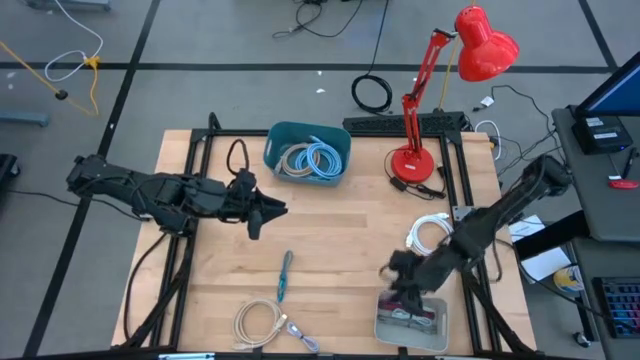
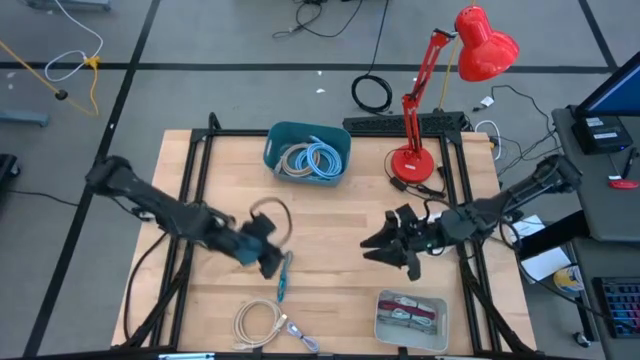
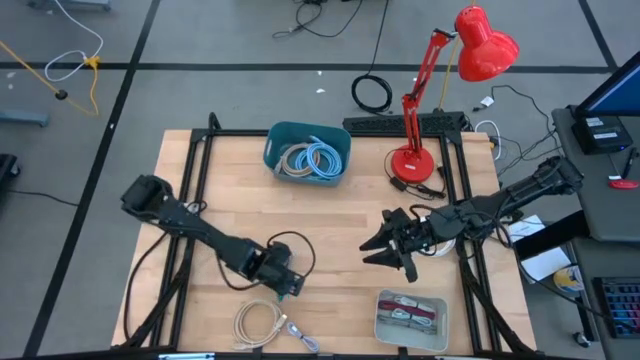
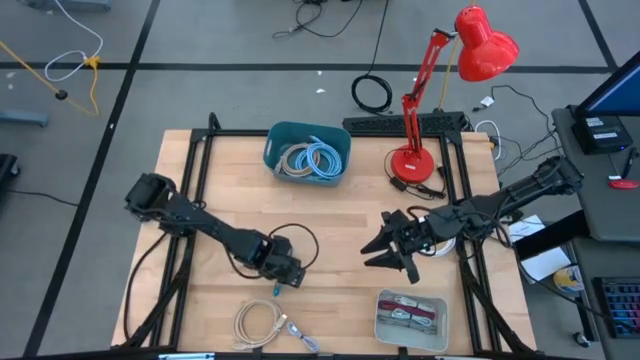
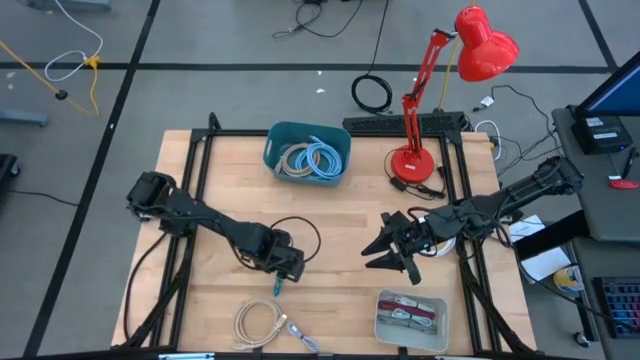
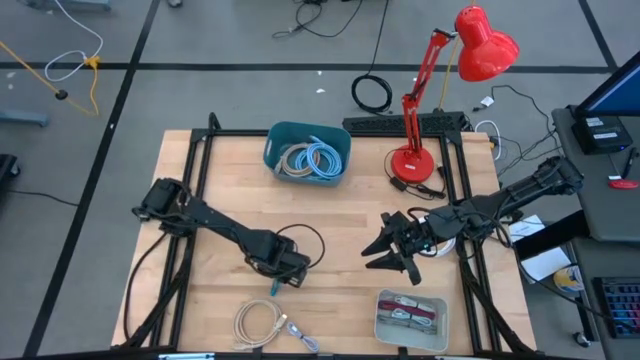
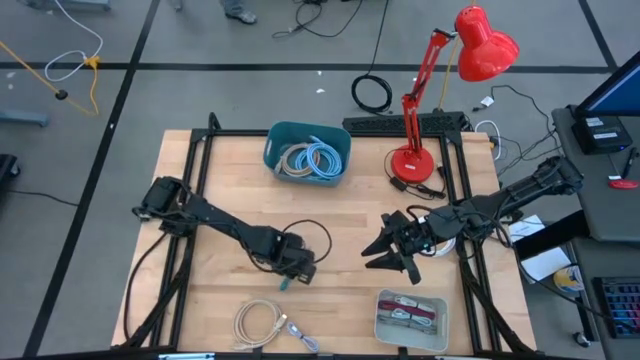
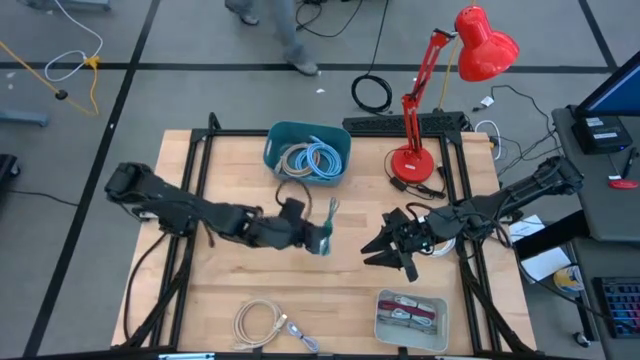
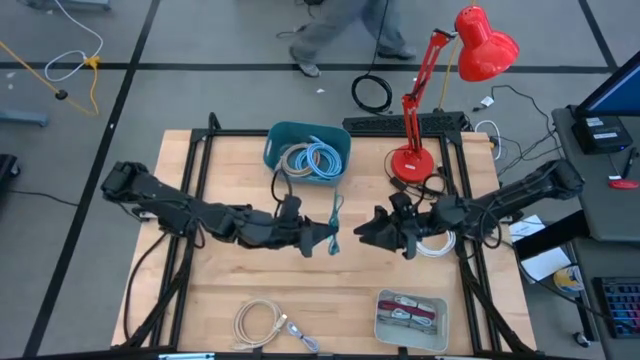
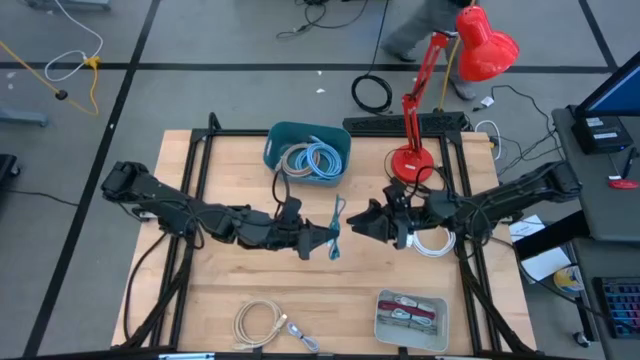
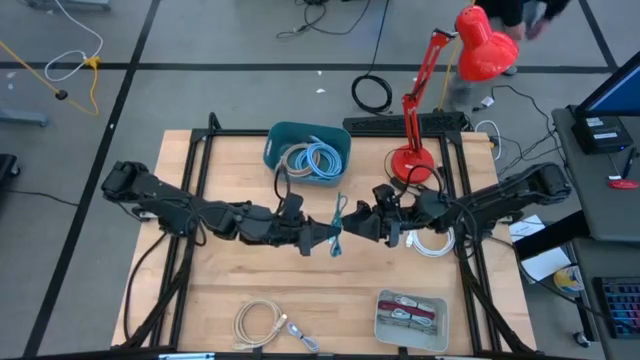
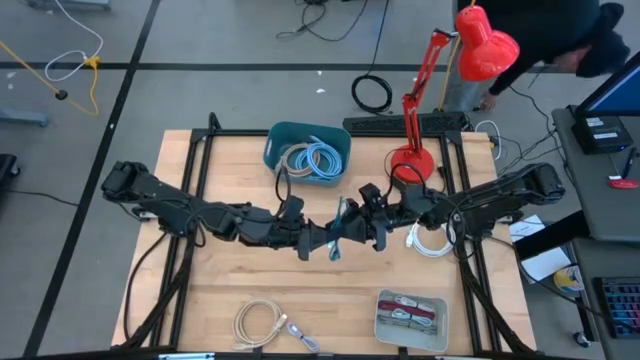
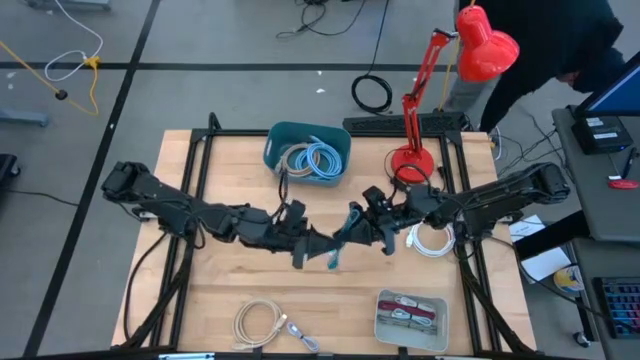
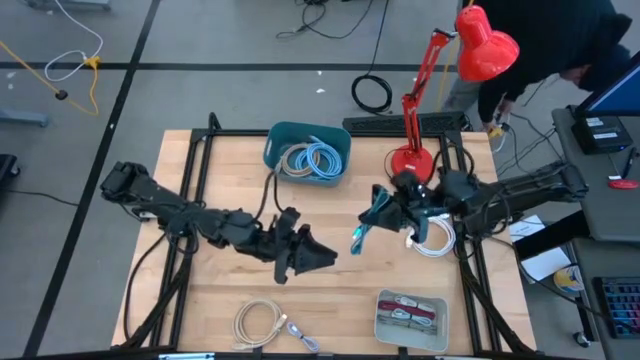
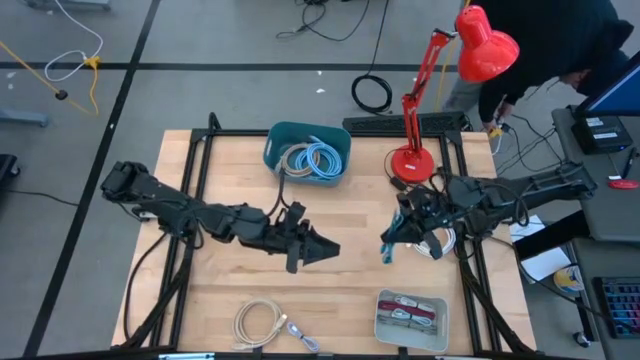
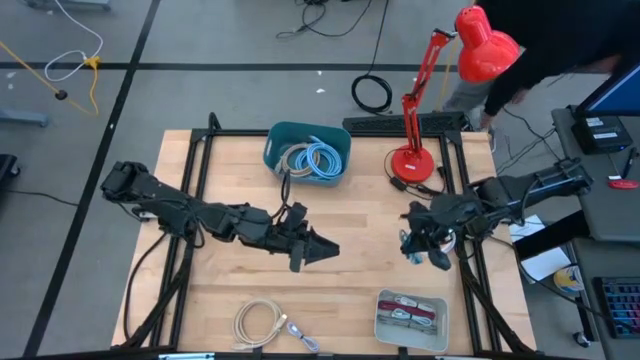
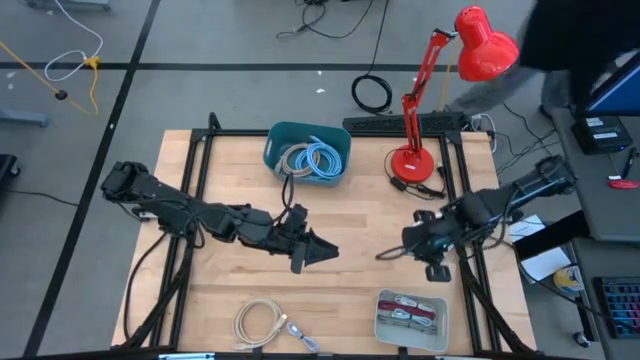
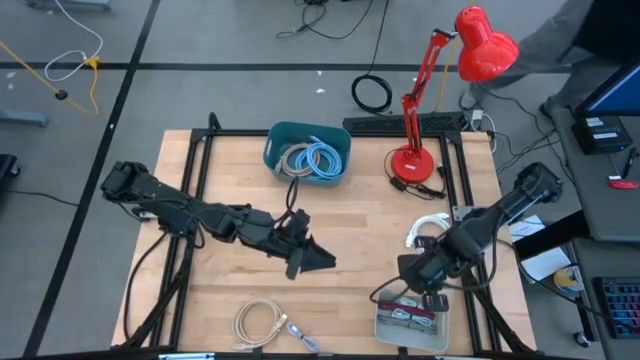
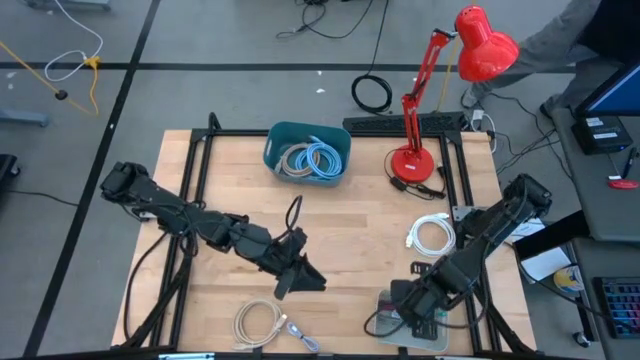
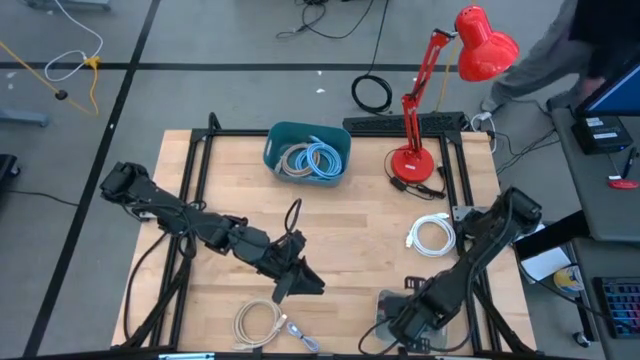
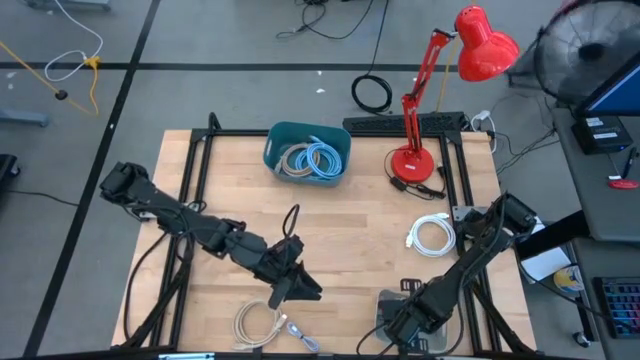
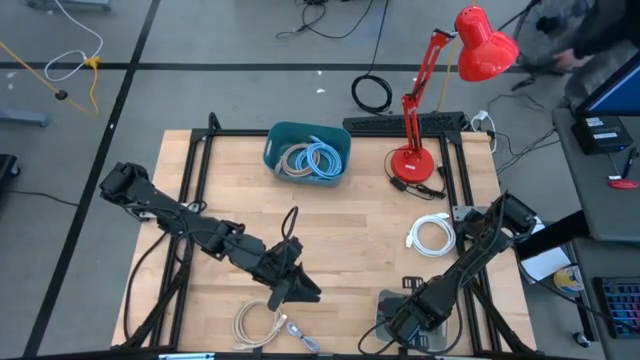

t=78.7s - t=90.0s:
Task: Sort cables into bins
Put the blue patterned charger cable into the gray bin

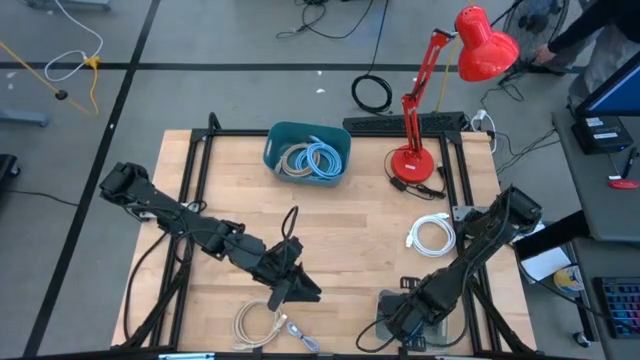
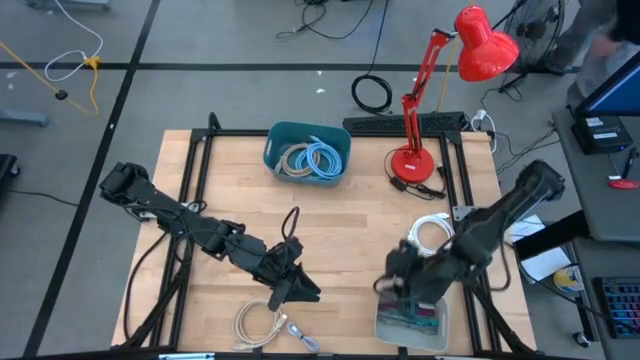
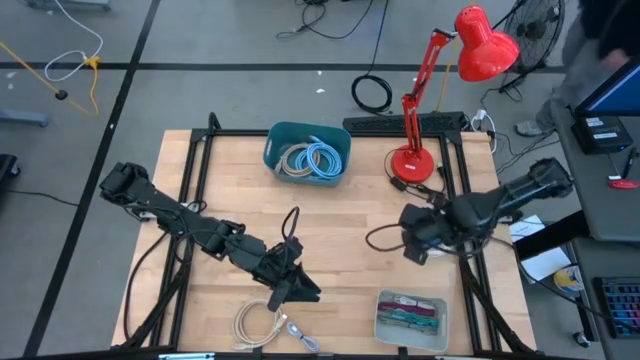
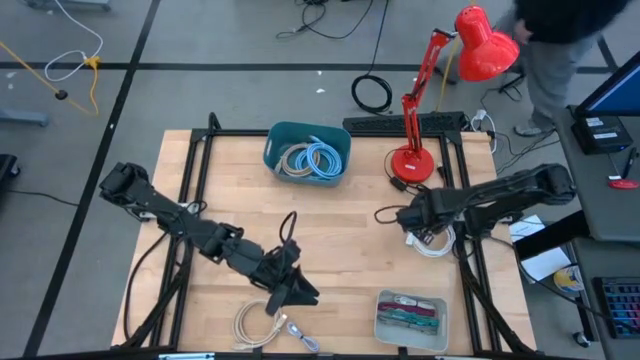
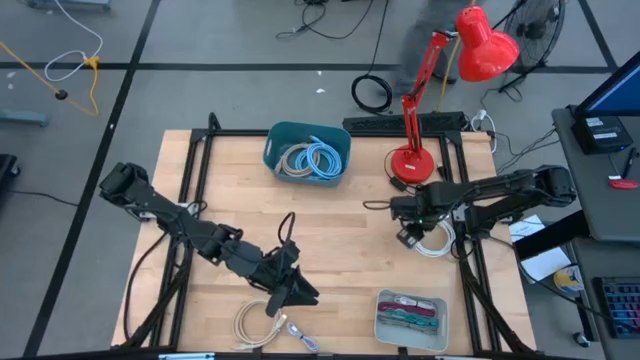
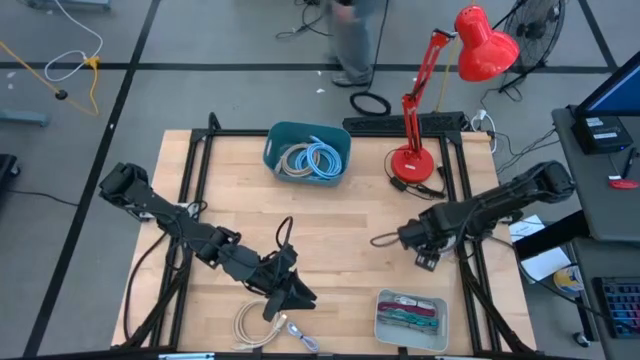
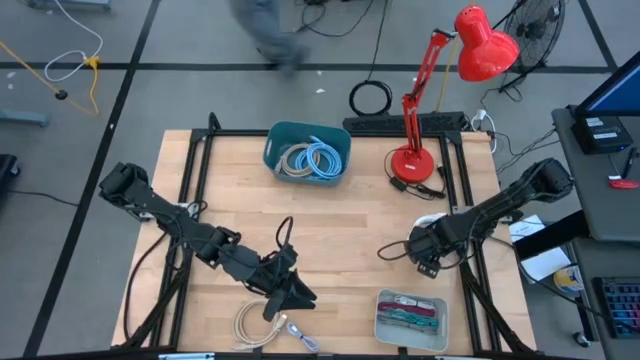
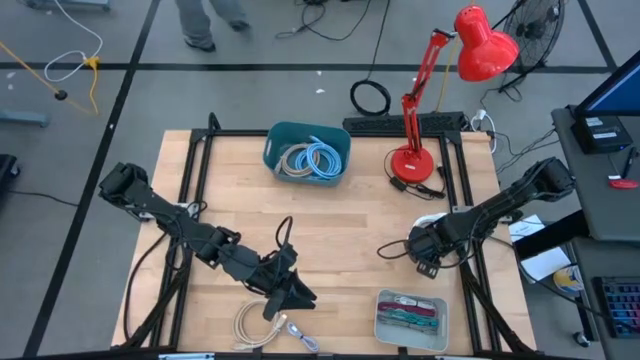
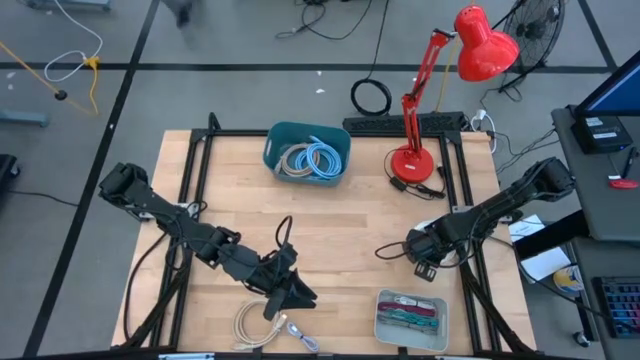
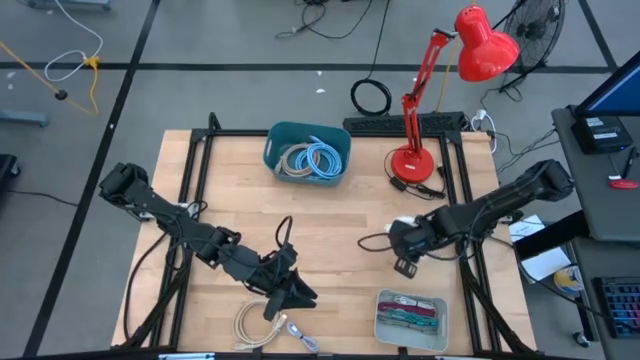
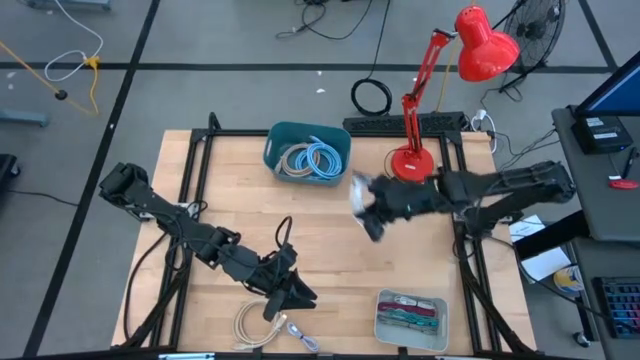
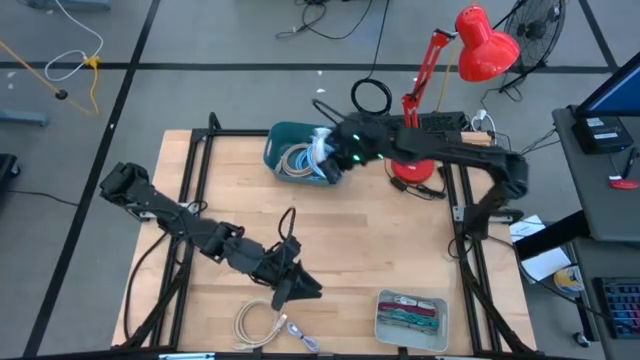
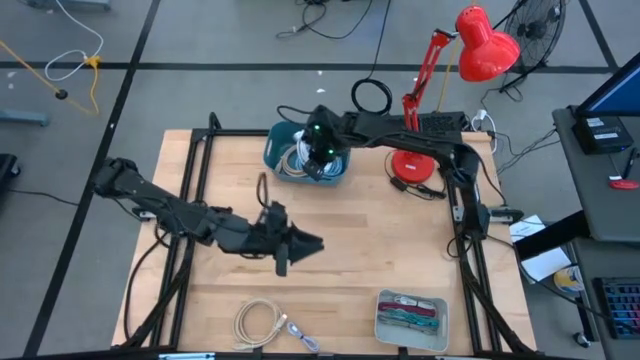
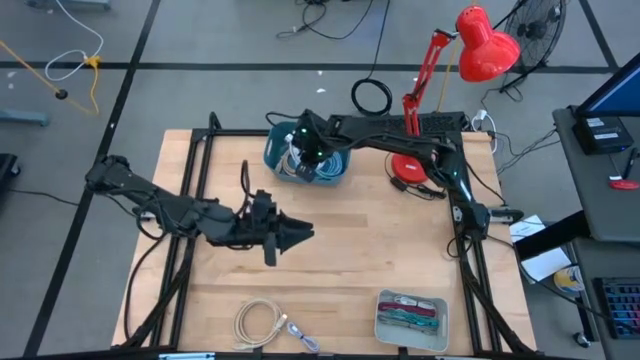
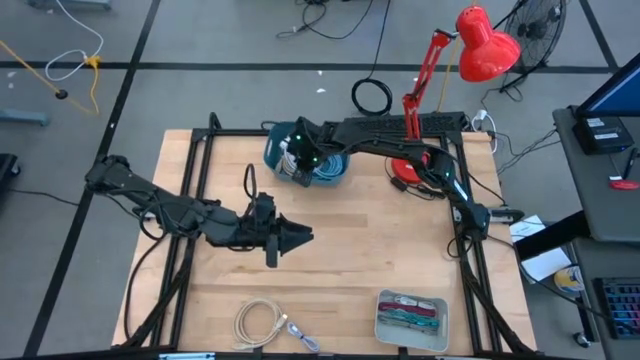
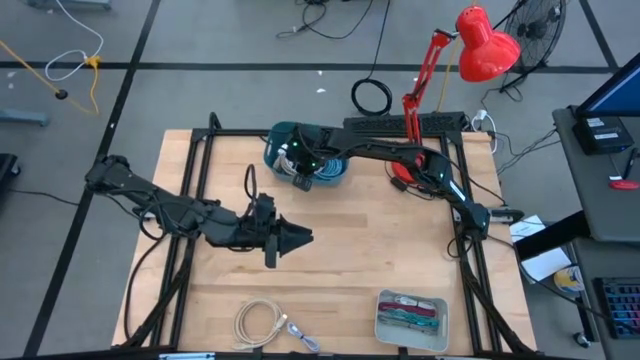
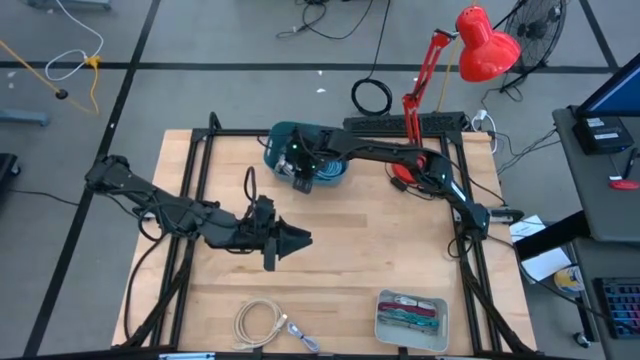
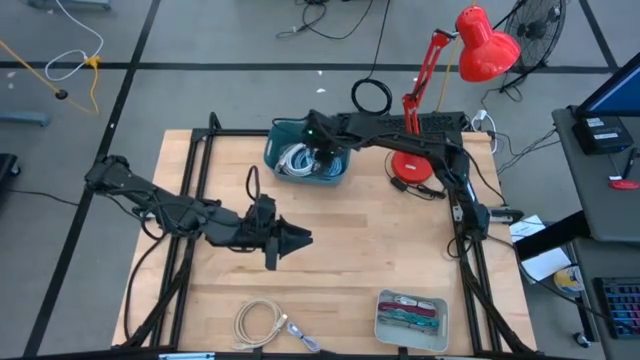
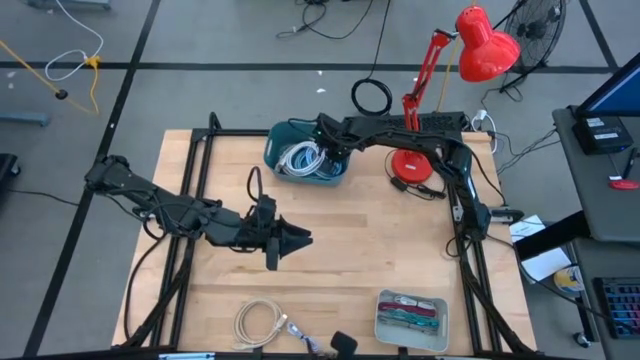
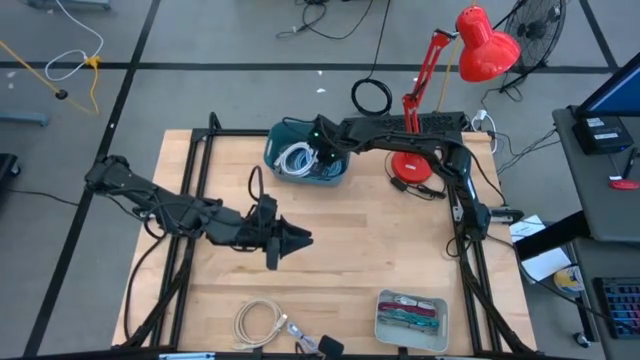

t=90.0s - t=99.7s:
Put the white HDMI cable into the blue bin
